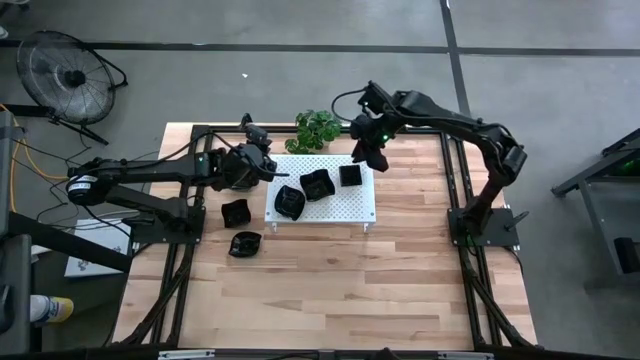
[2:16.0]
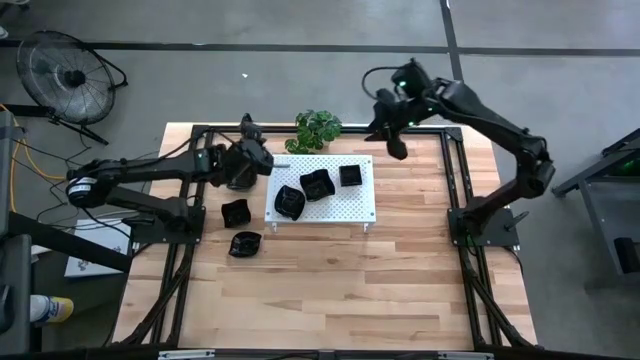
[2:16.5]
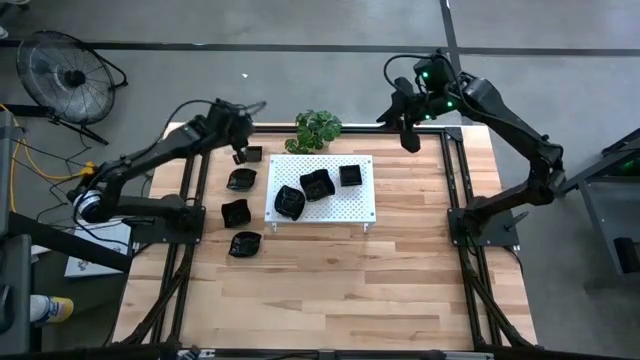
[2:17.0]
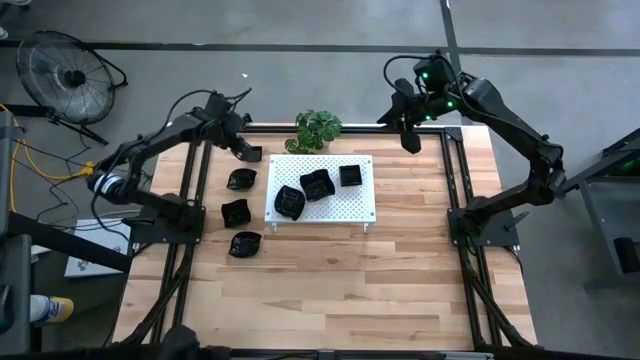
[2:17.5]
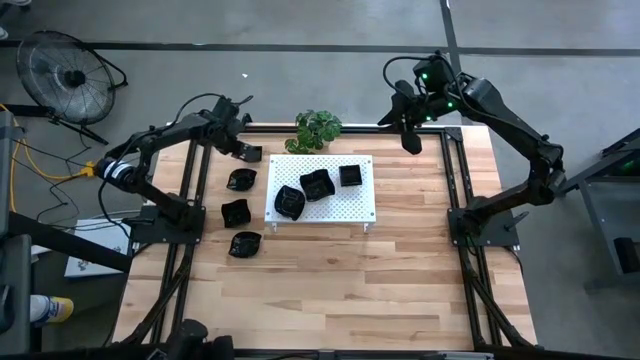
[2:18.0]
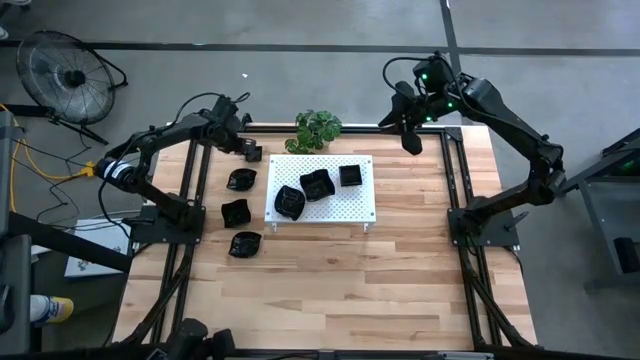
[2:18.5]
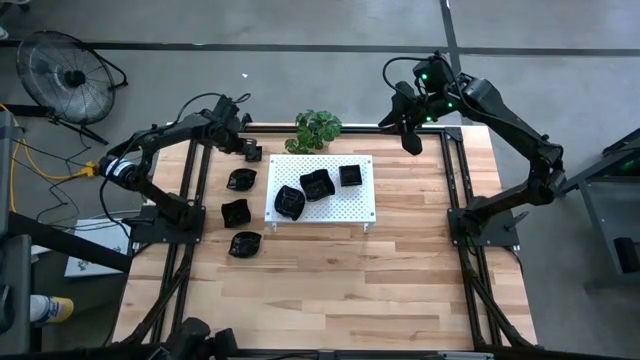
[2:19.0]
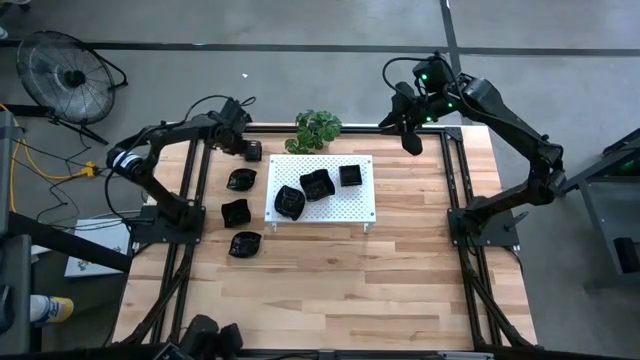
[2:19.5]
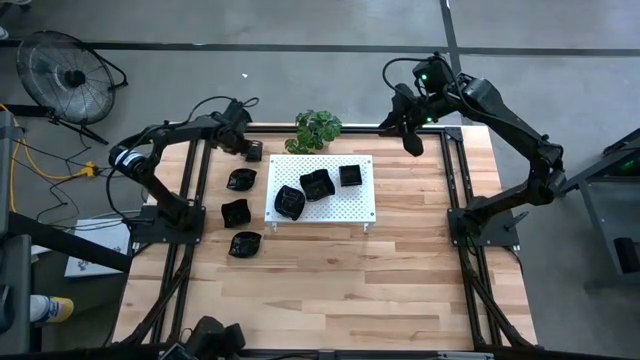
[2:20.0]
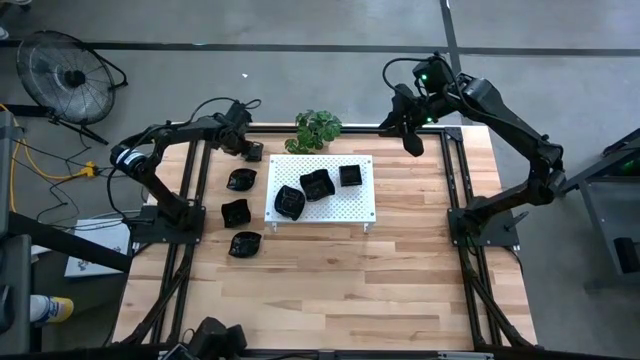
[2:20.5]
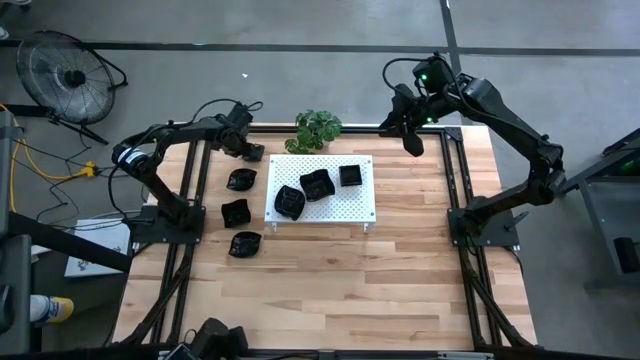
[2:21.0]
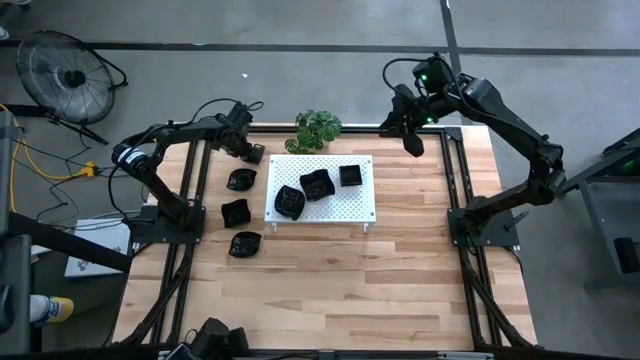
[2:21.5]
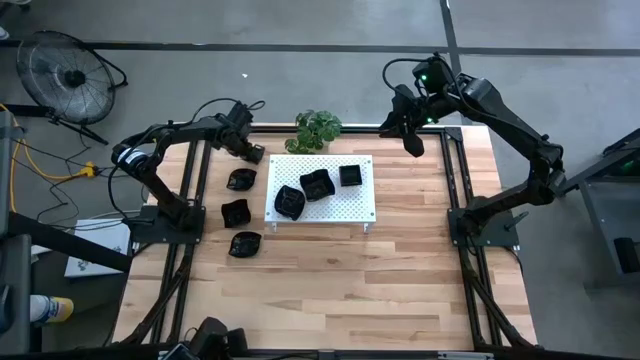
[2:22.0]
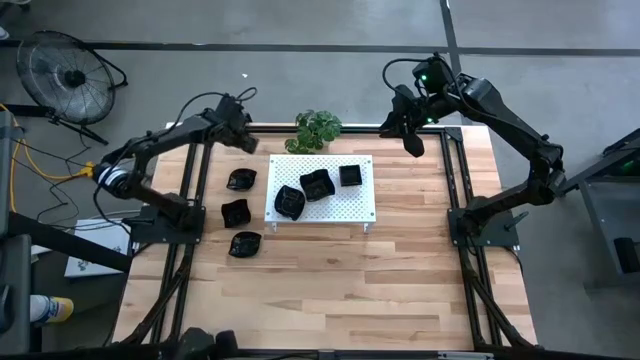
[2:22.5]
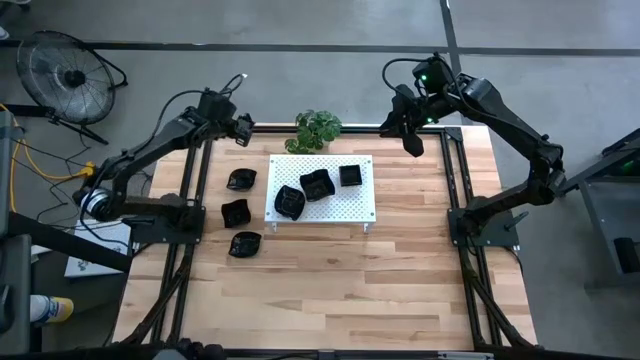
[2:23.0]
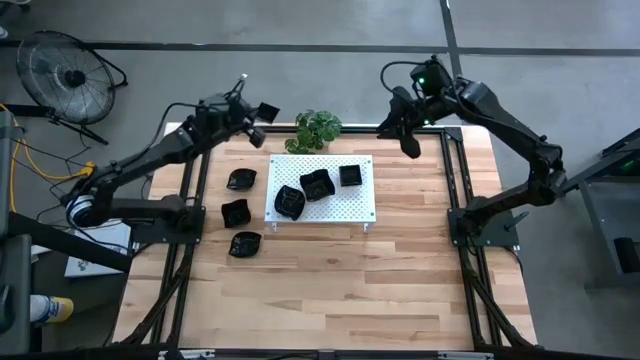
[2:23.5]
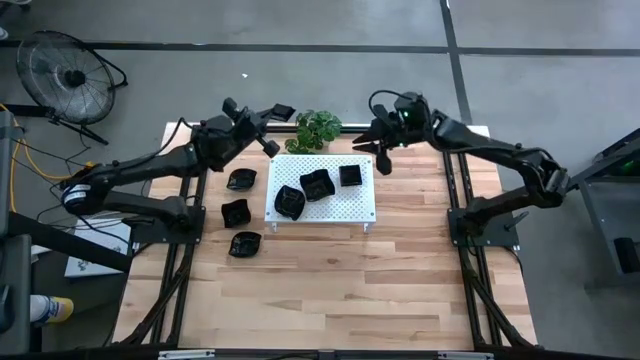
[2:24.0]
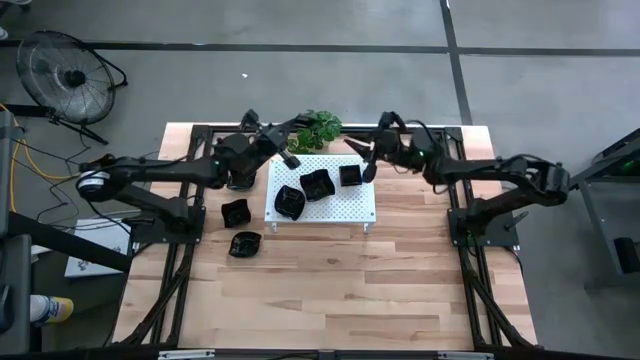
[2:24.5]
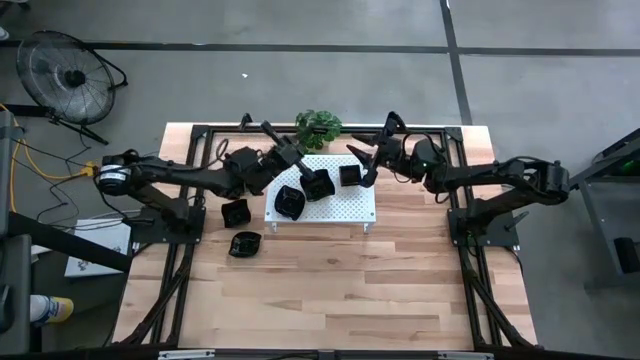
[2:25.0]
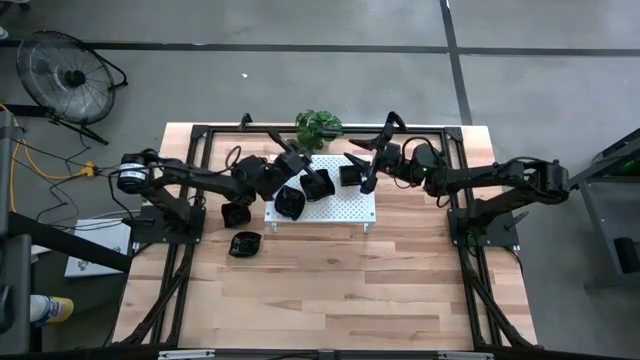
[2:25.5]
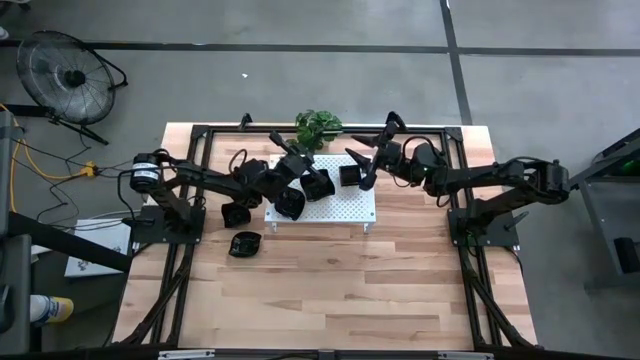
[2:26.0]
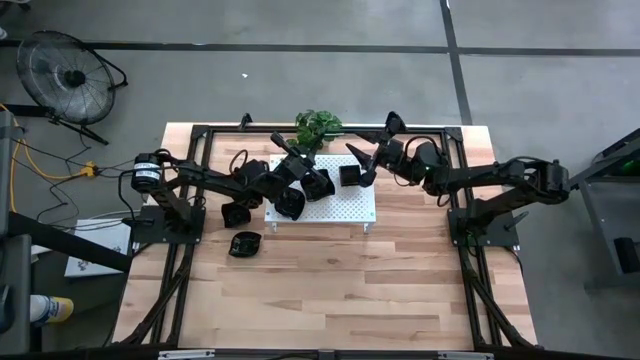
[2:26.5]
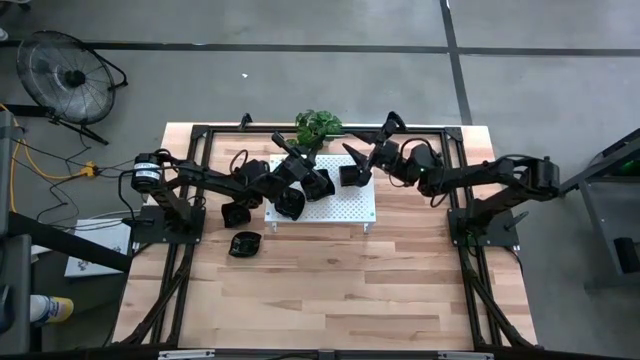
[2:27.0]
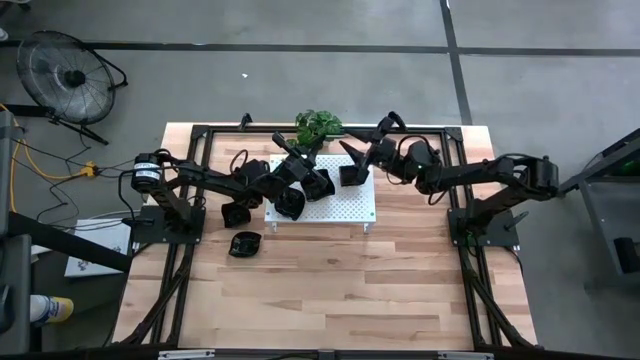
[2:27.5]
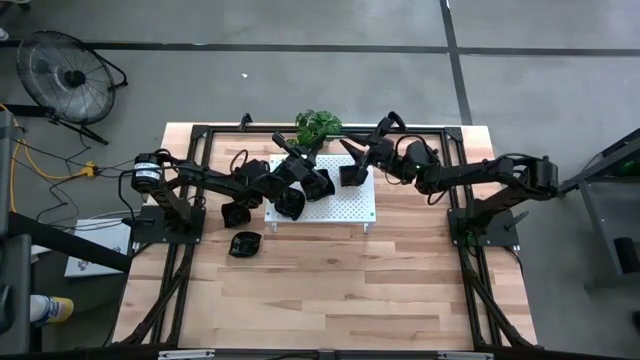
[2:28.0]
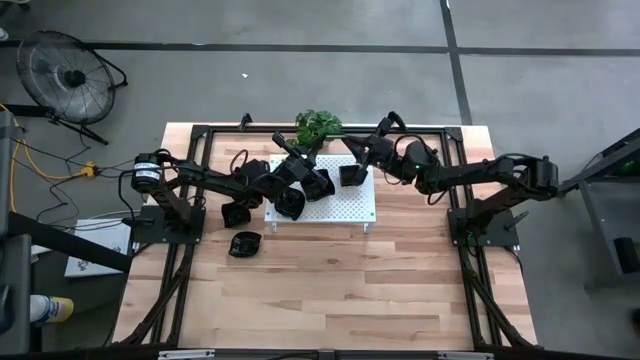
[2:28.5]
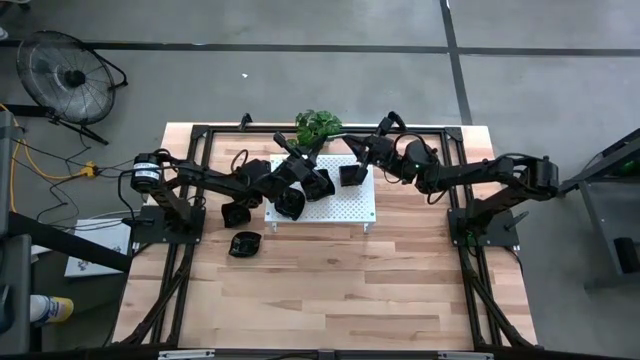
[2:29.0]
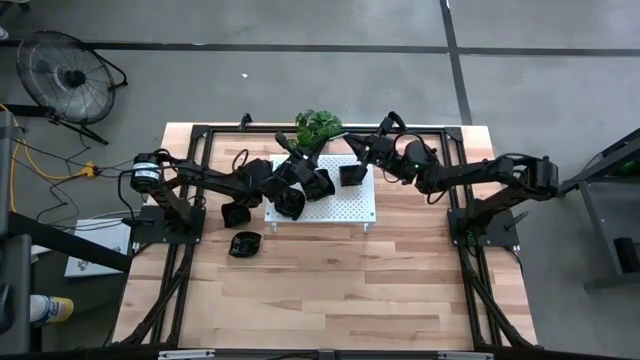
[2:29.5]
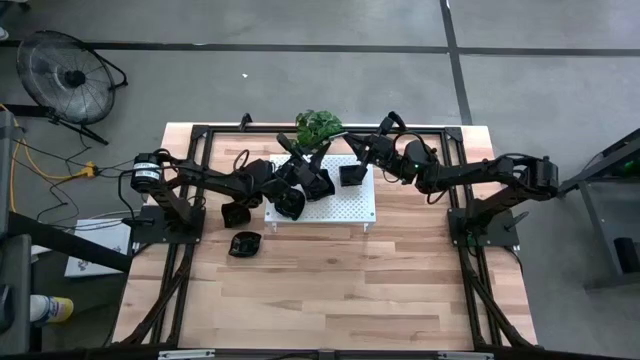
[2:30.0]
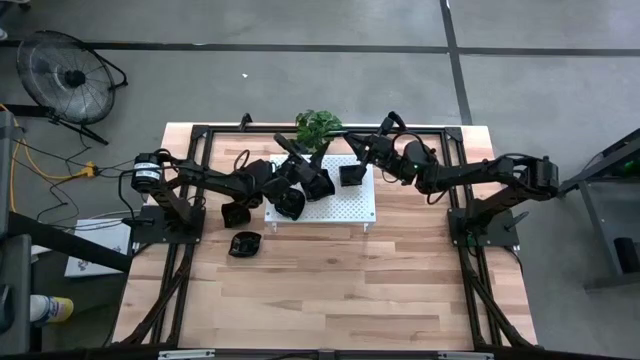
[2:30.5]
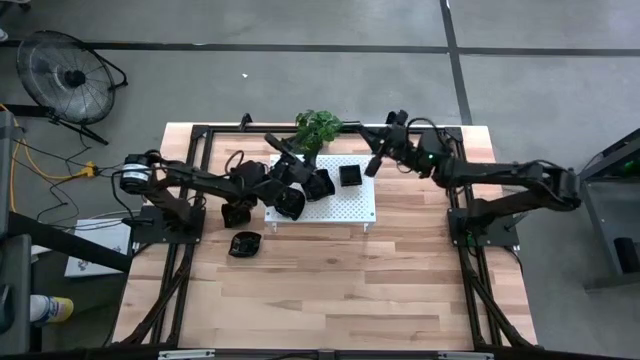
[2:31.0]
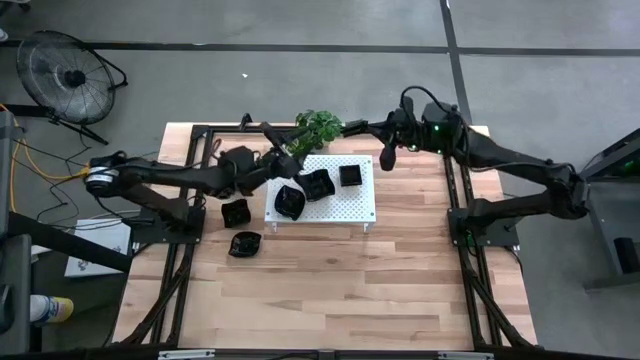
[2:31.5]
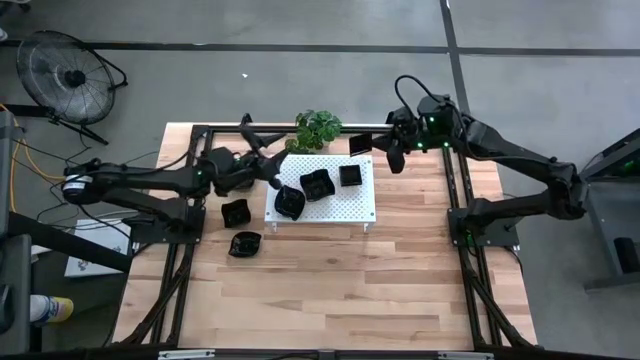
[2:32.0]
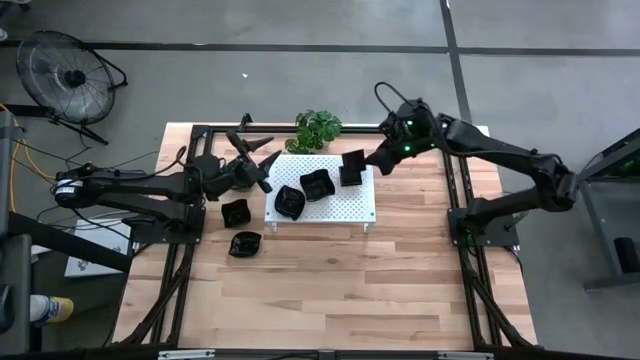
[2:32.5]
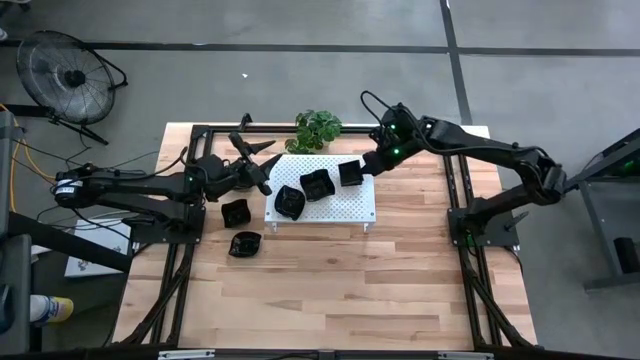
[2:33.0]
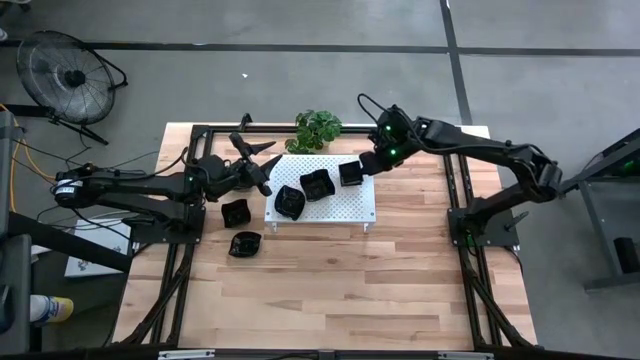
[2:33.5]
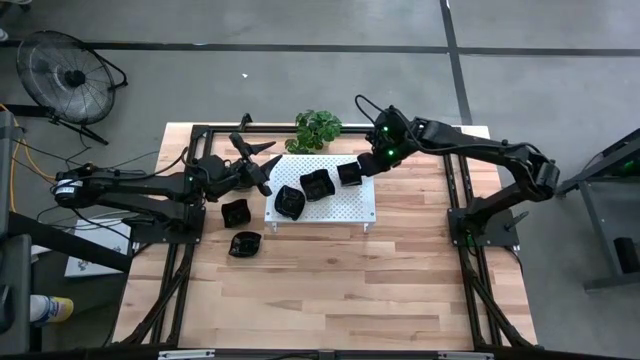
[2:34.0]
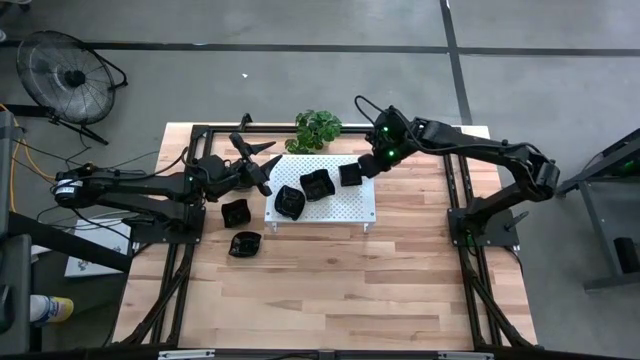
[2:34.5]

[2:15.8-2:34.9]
Task: Pick & Place Mini shaped plates
Stack the square plate on top of the square plates on the shelf

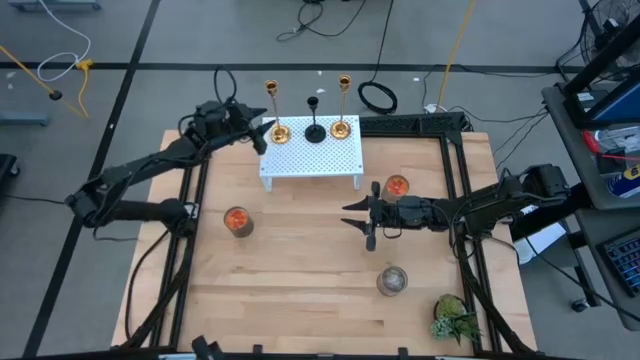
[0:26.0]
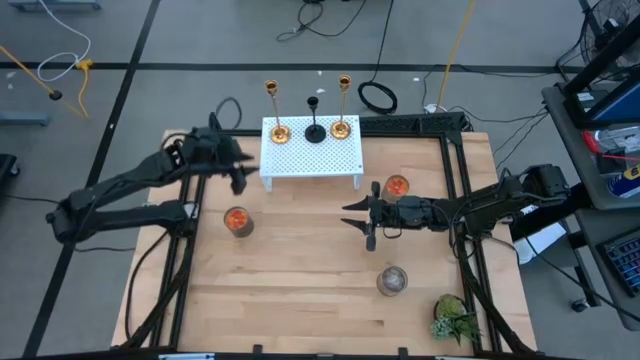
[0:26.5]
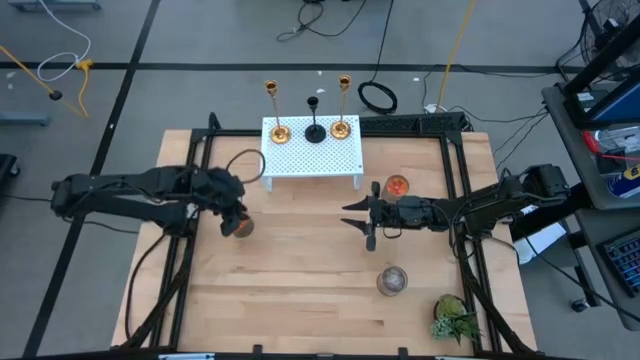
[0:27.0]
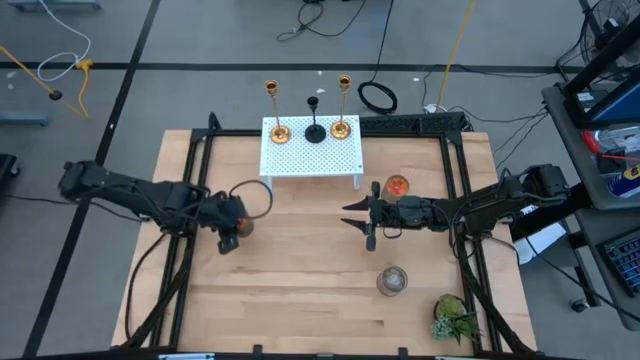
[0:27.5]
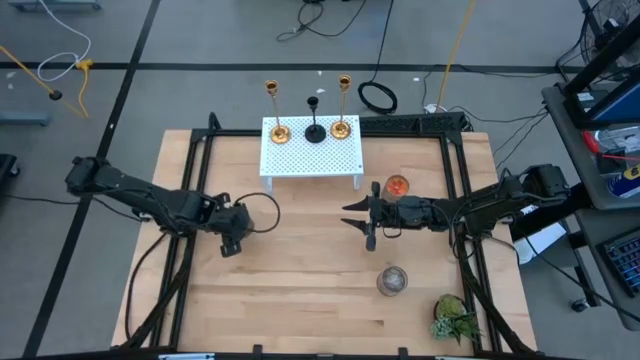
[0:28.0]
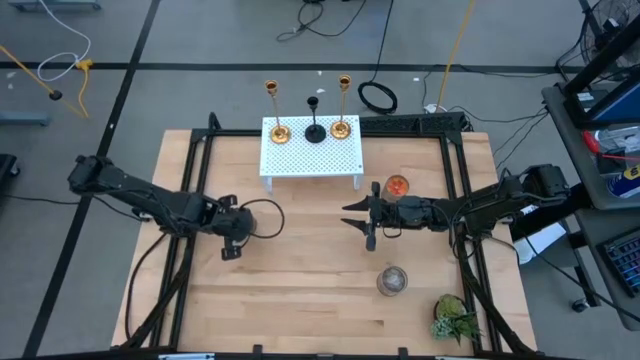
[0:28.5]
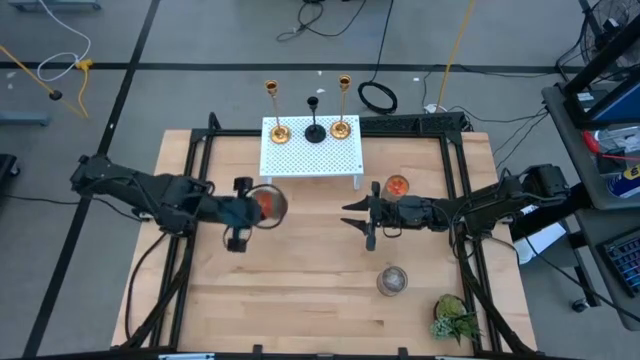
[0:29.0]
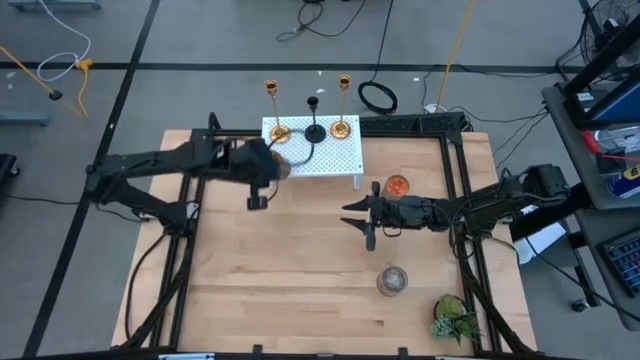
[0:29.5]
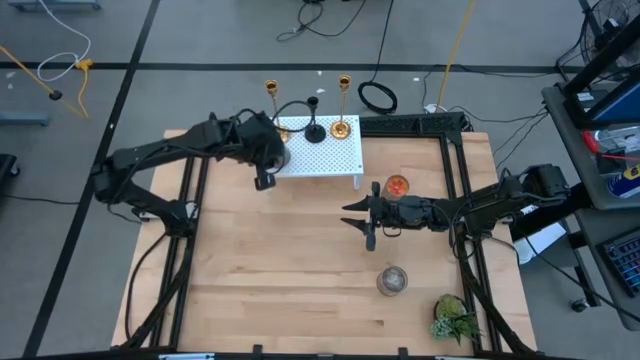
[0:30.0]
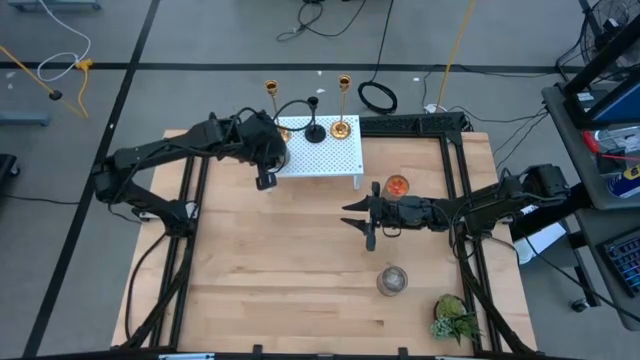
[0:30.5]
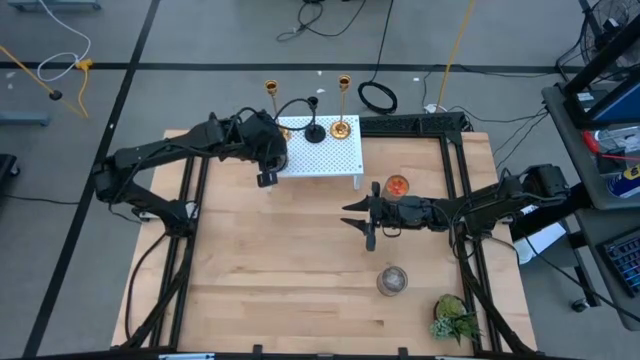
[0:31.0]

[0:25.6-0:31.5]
Task: Pick & Place candle stick holders
Put the left orange candle on the shelf
